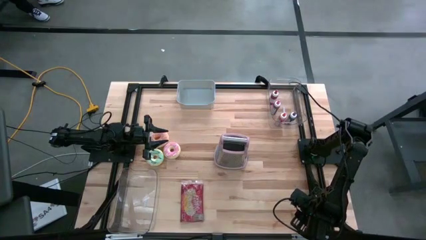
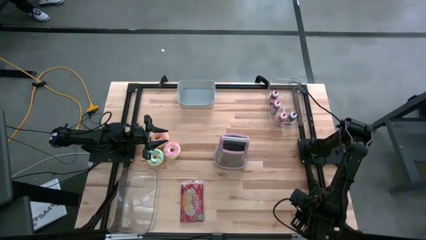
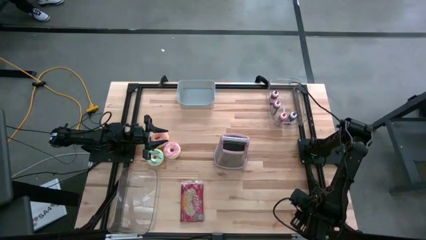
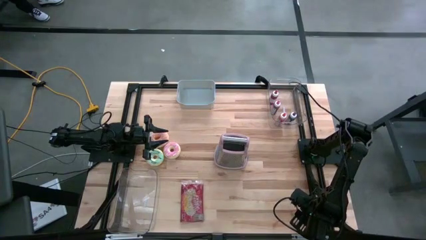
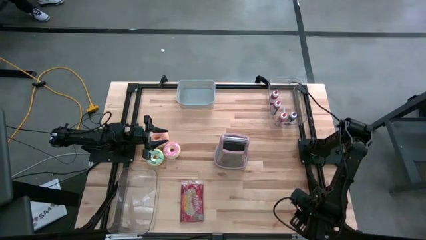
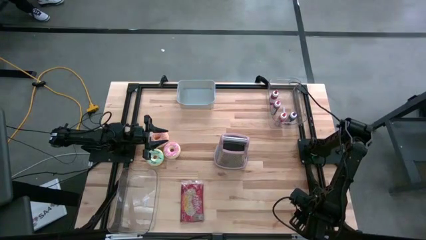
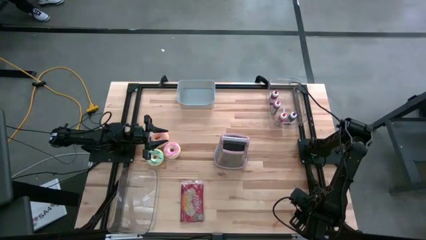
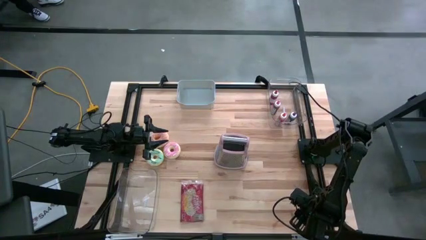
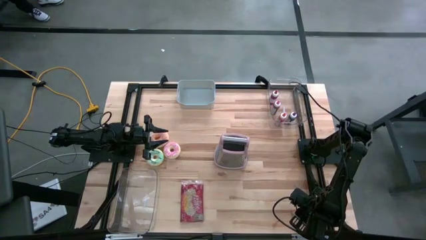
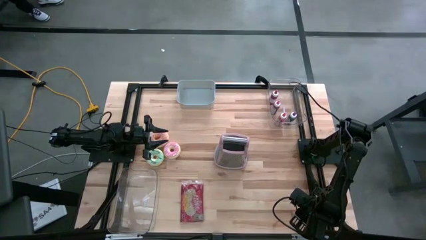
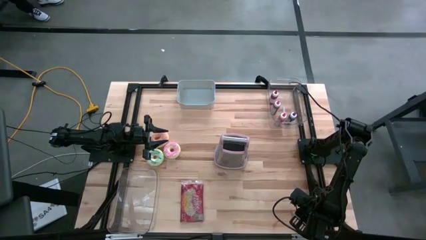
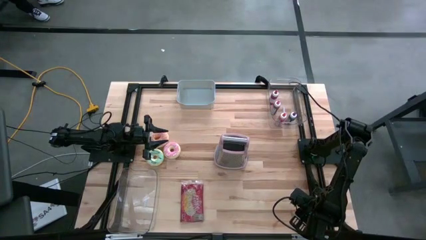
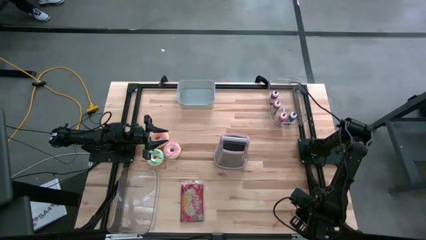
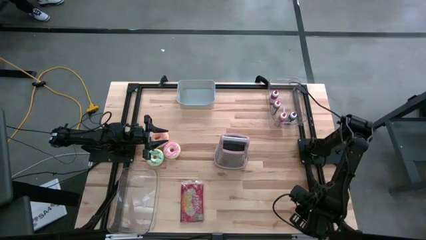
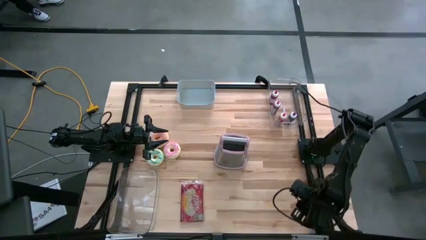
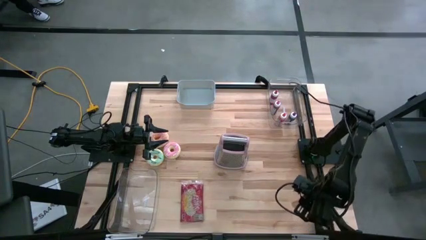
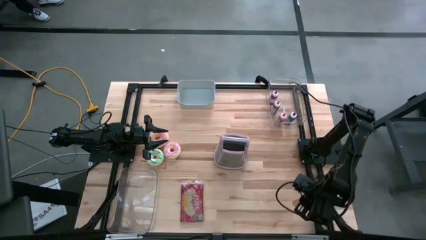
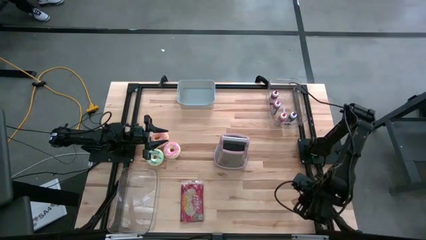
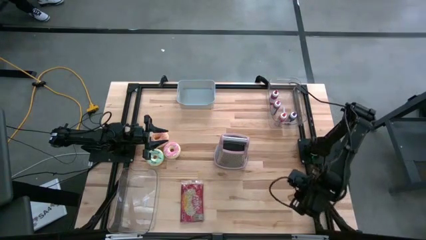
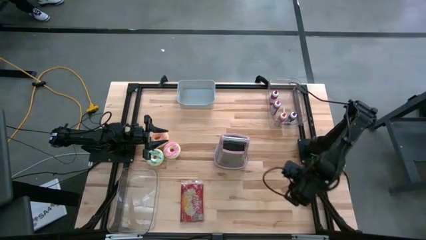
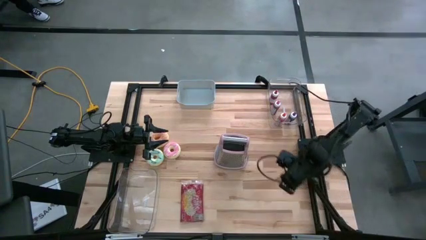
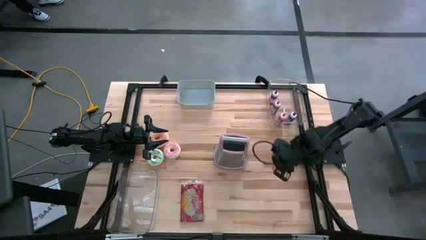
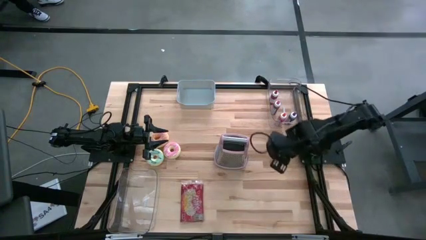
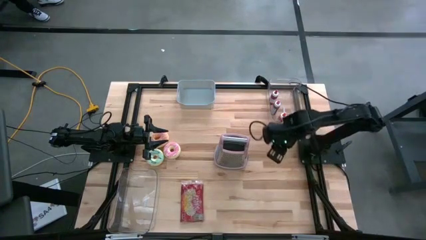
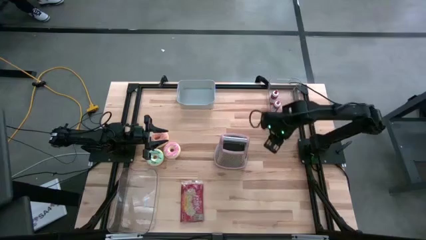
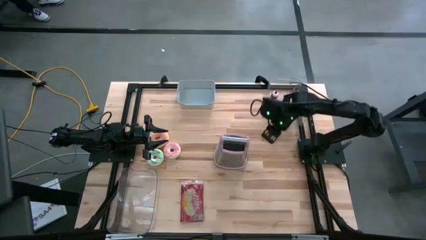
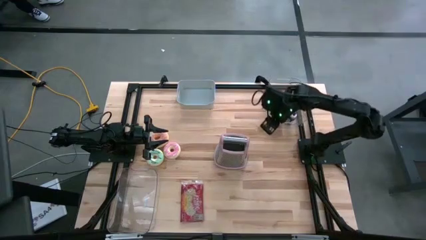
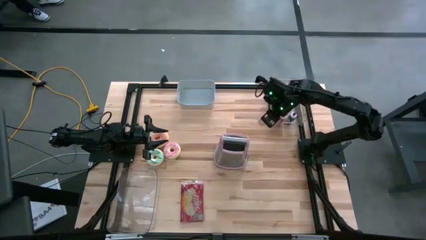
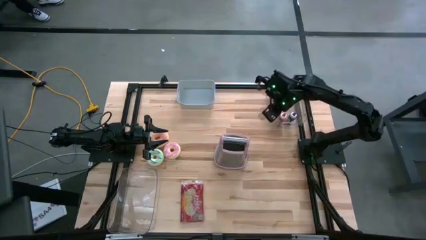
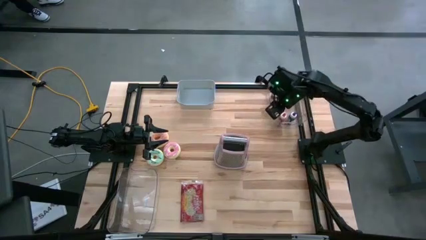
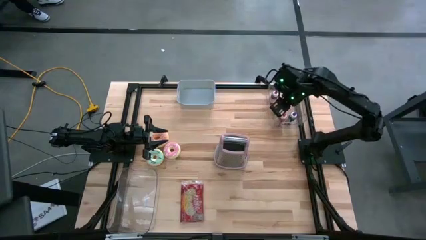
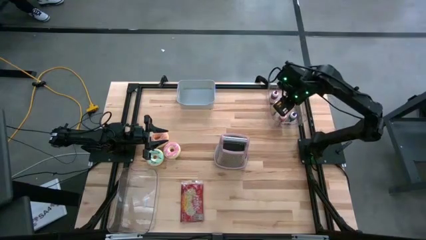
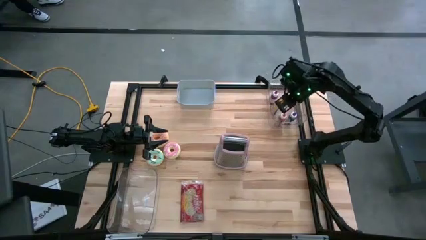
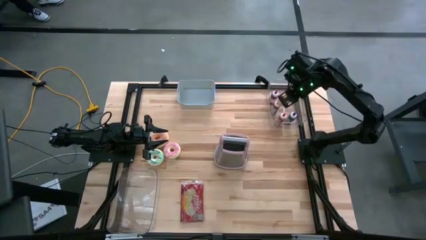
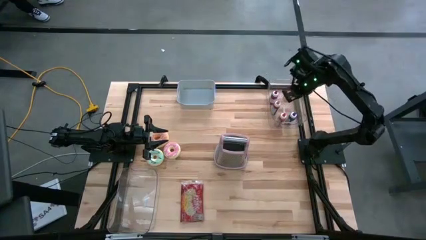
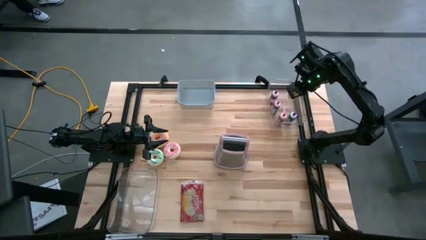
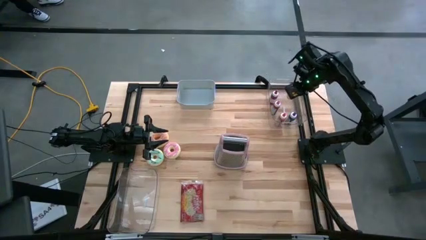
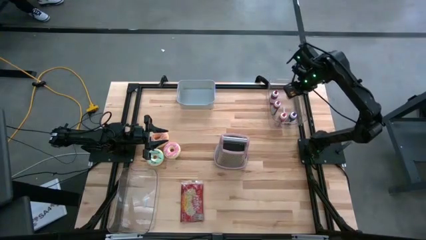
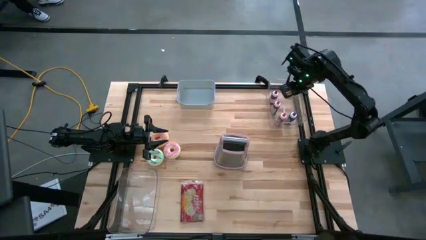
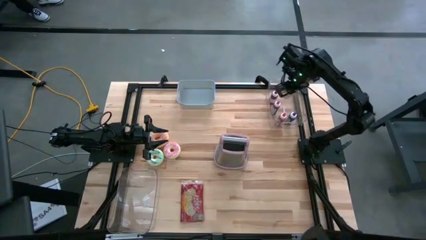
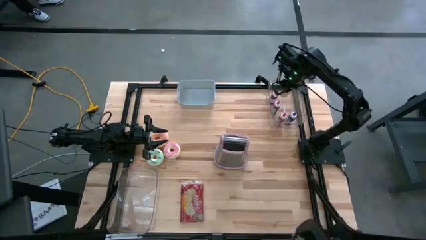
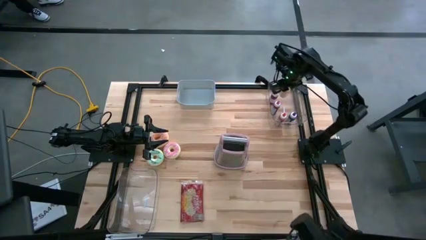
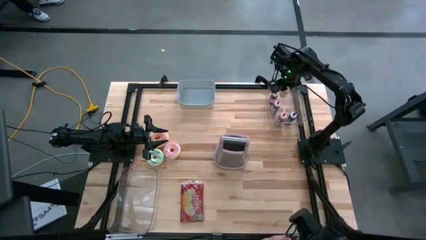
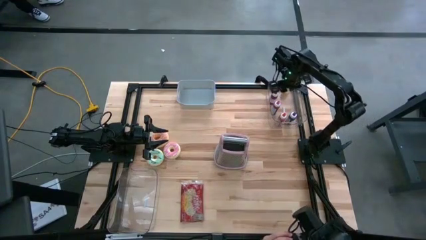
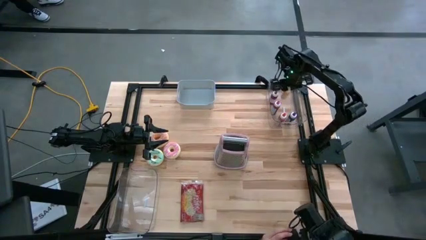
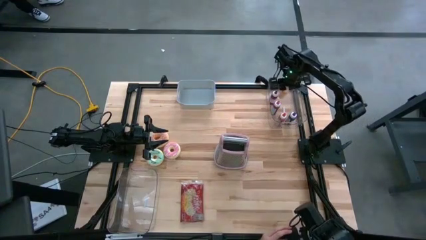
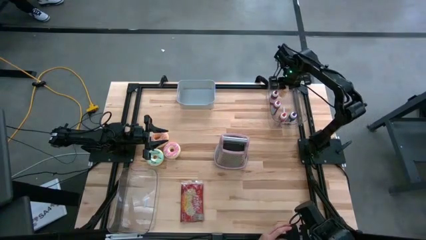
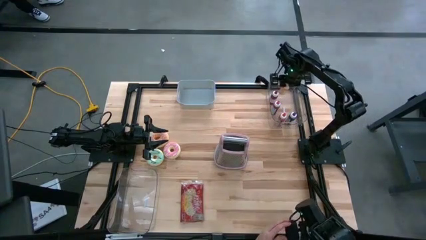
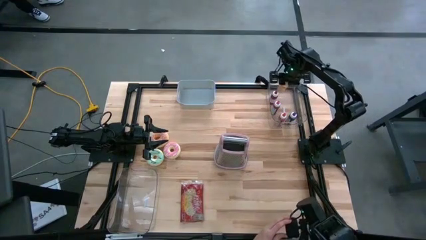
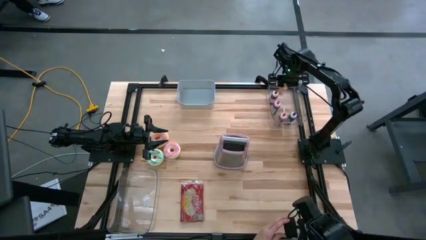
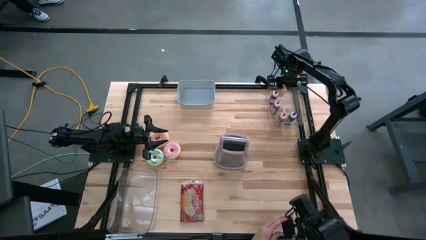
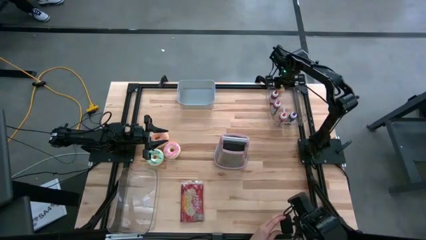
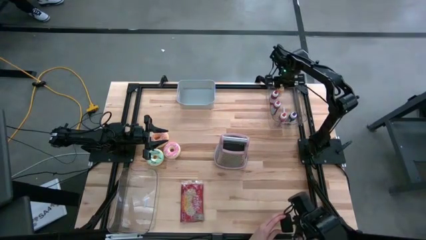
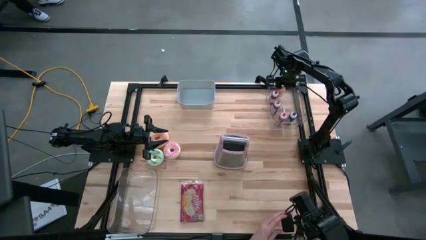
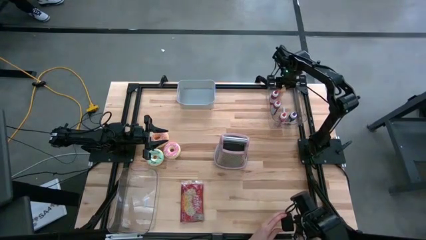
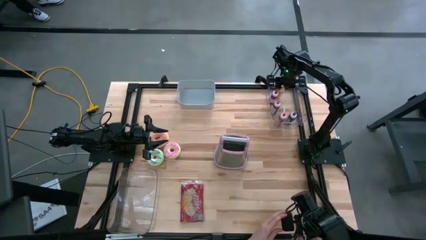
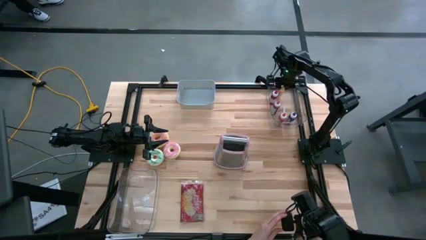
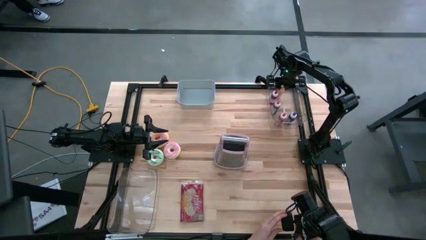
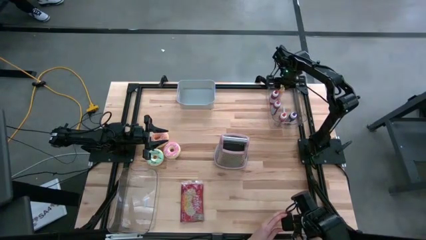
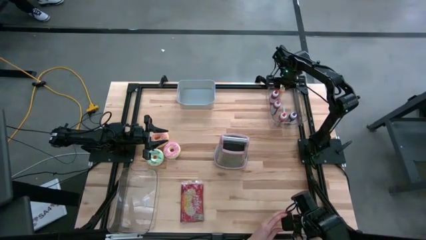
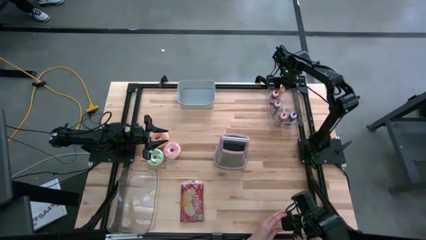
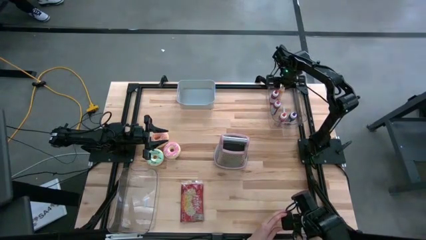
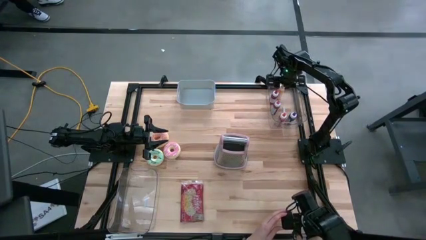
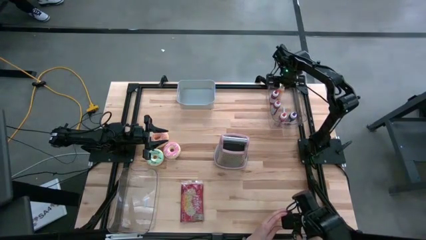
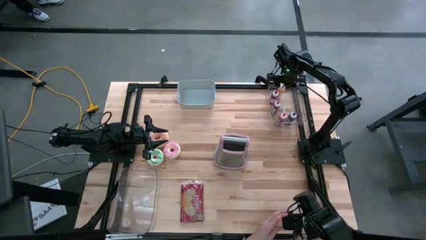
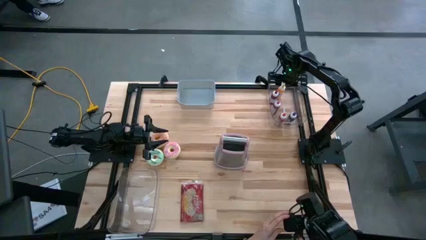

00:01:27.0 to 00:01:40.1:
Put the yellow food coloring into the right transparent bin
